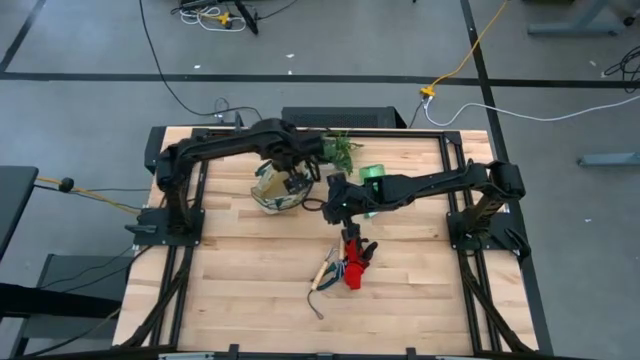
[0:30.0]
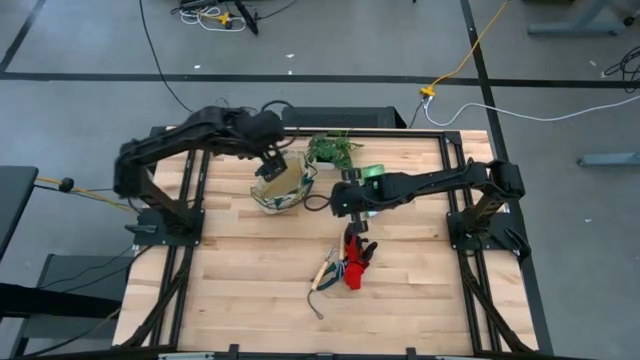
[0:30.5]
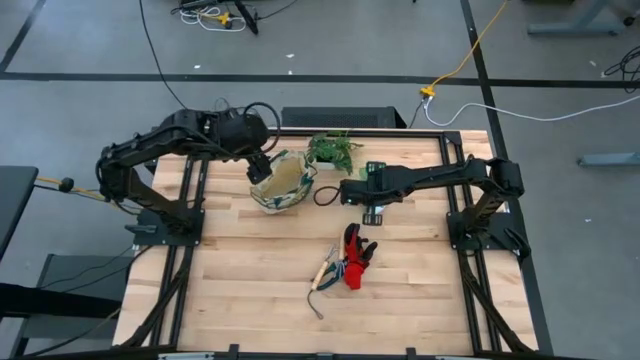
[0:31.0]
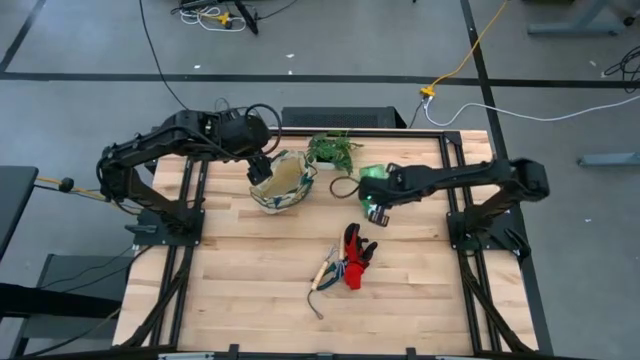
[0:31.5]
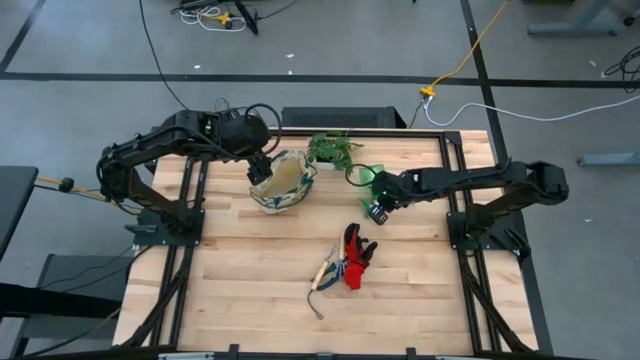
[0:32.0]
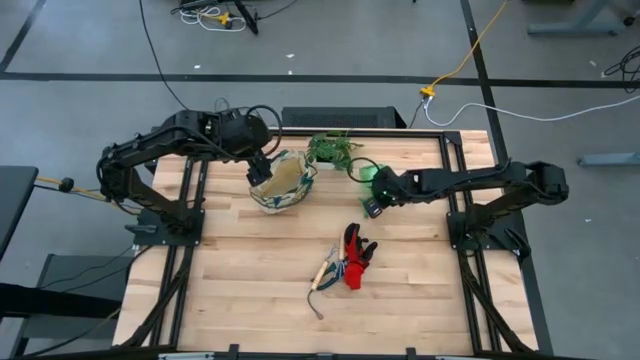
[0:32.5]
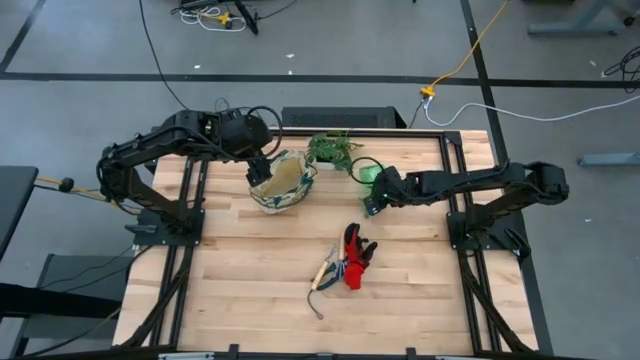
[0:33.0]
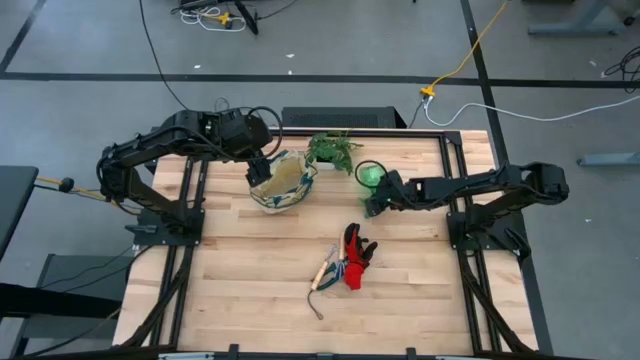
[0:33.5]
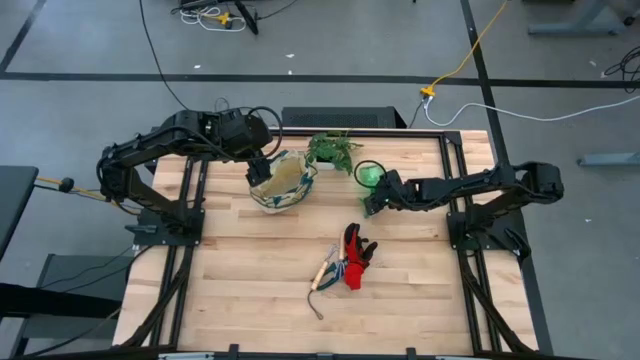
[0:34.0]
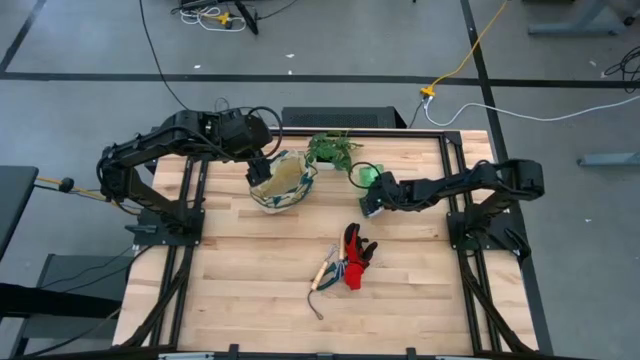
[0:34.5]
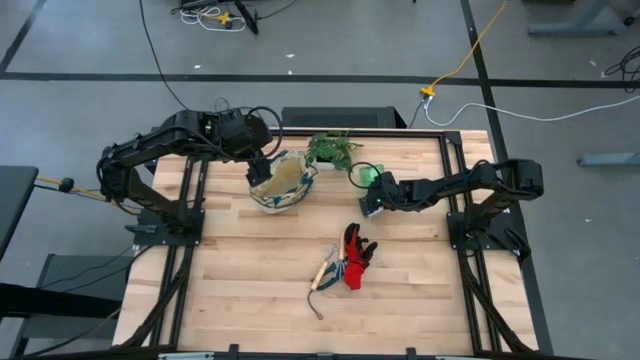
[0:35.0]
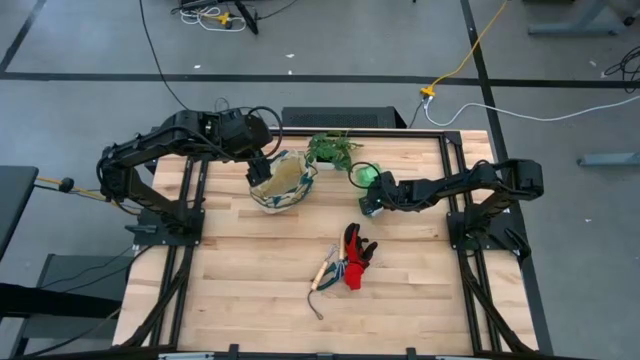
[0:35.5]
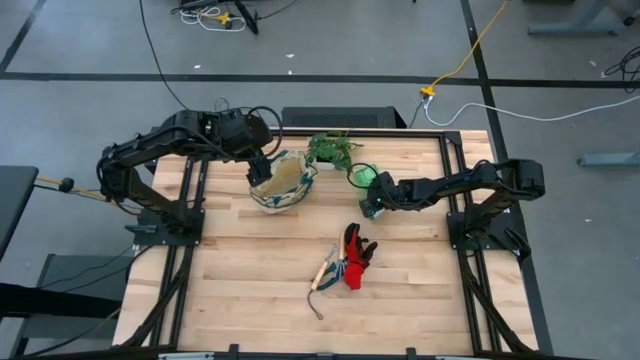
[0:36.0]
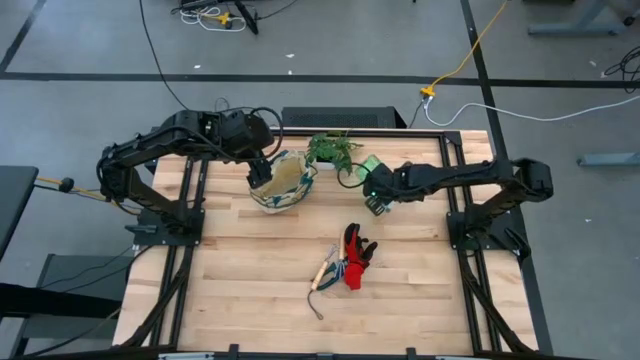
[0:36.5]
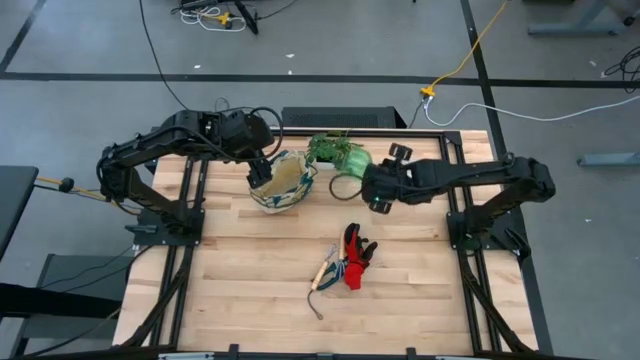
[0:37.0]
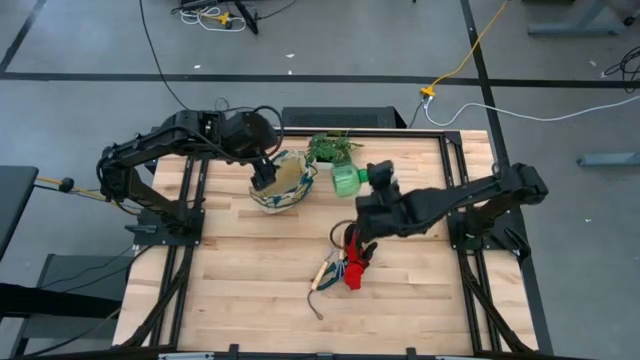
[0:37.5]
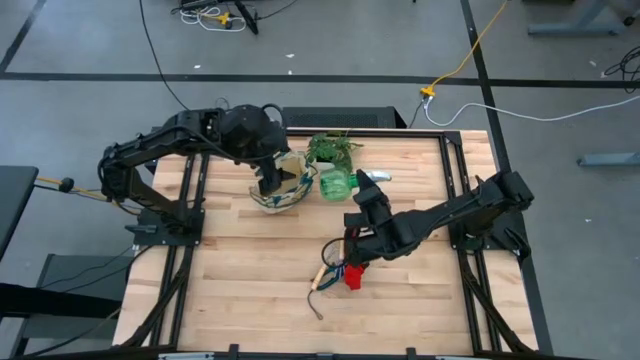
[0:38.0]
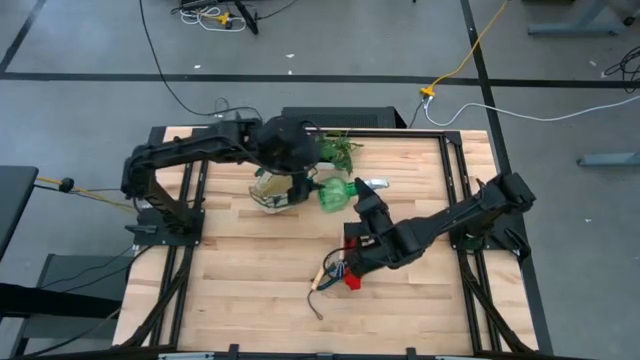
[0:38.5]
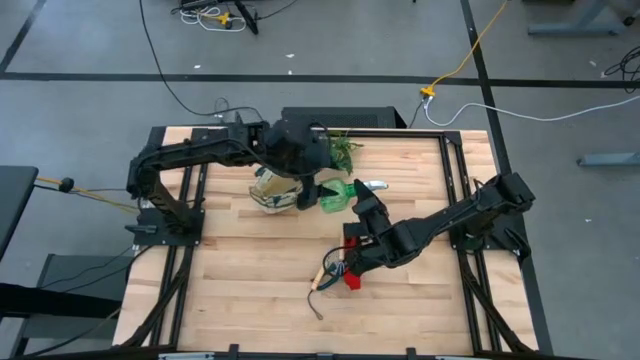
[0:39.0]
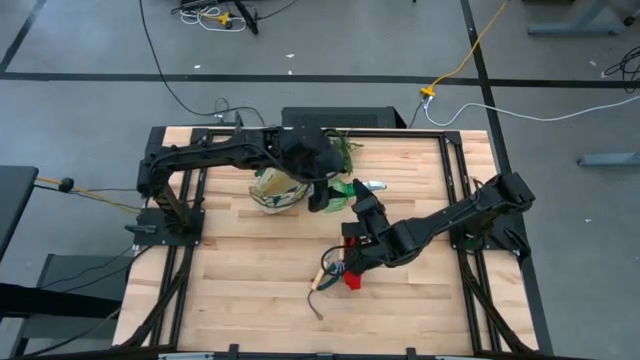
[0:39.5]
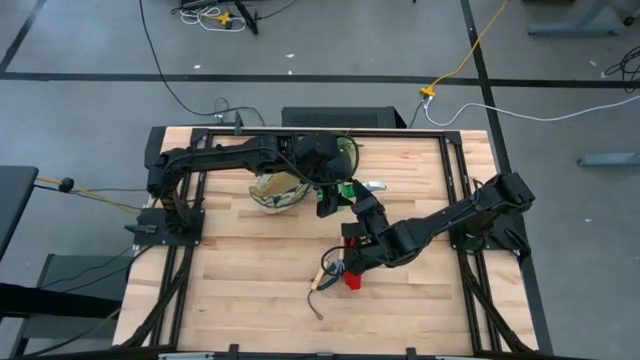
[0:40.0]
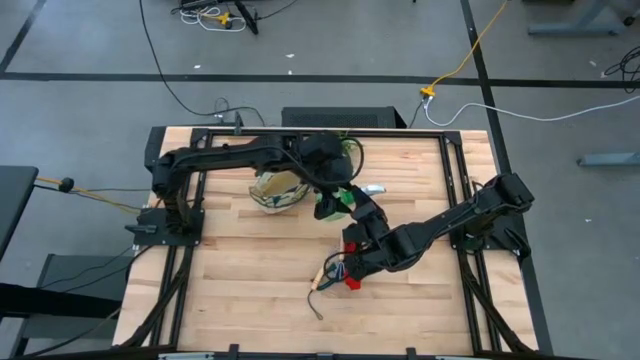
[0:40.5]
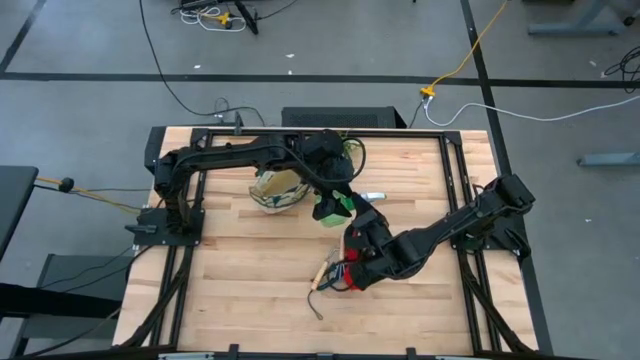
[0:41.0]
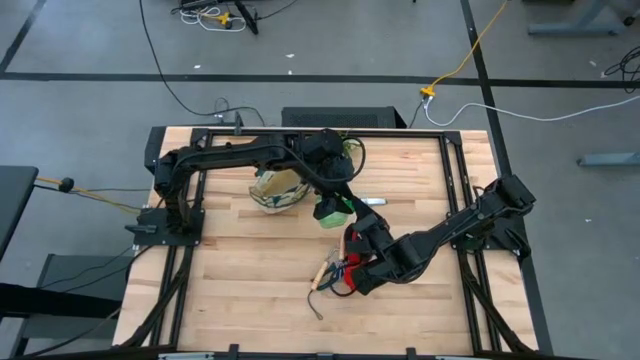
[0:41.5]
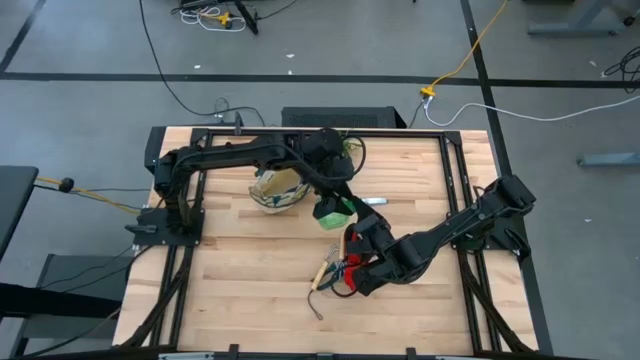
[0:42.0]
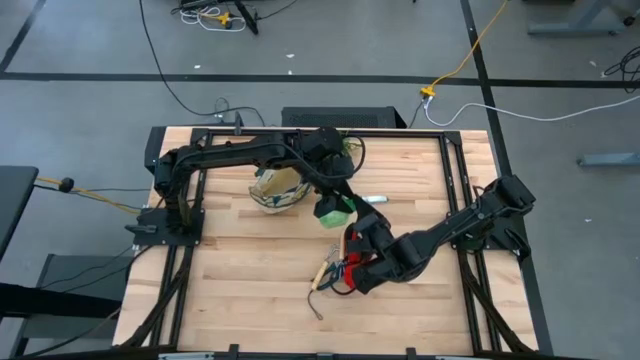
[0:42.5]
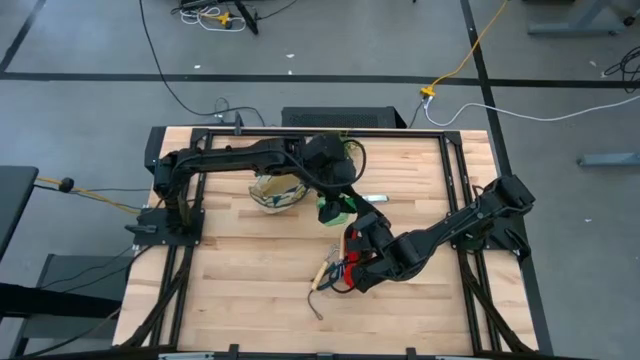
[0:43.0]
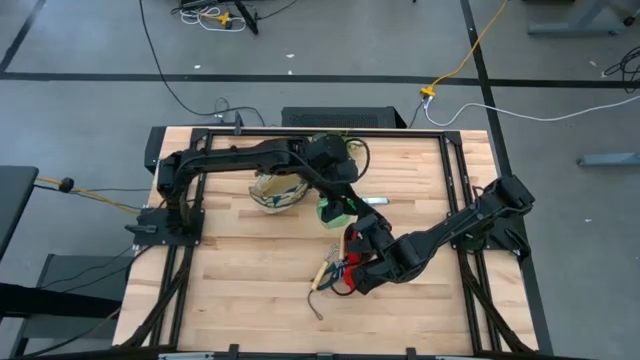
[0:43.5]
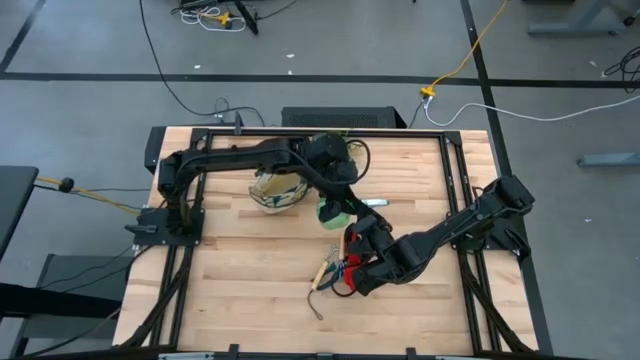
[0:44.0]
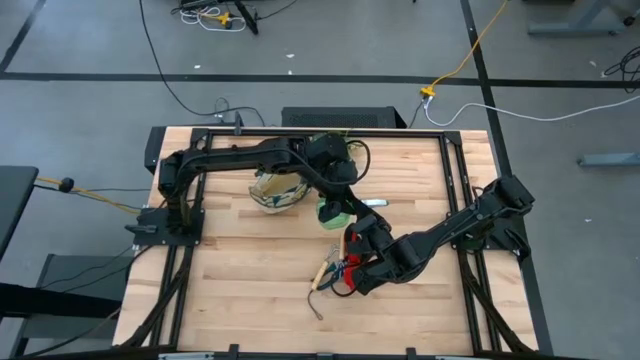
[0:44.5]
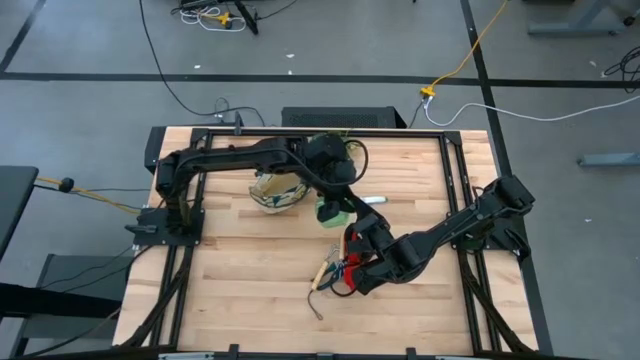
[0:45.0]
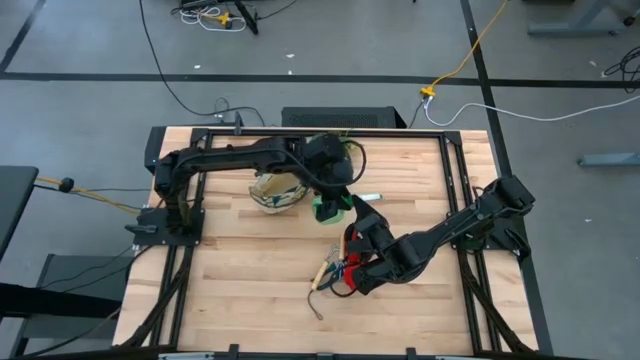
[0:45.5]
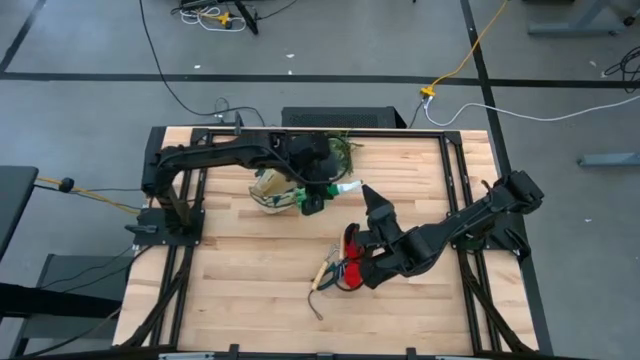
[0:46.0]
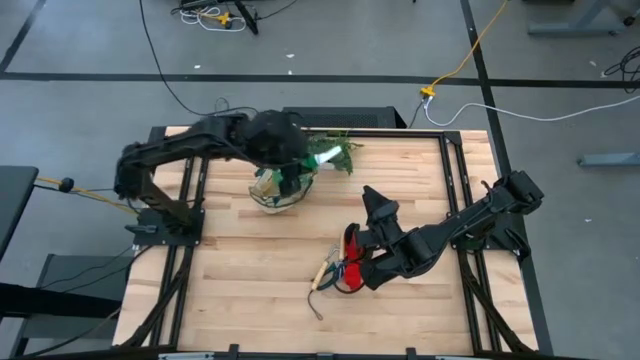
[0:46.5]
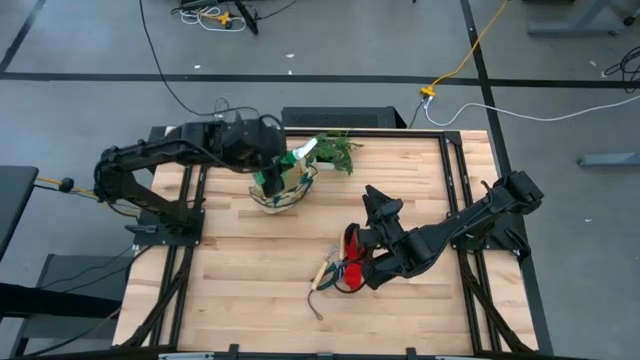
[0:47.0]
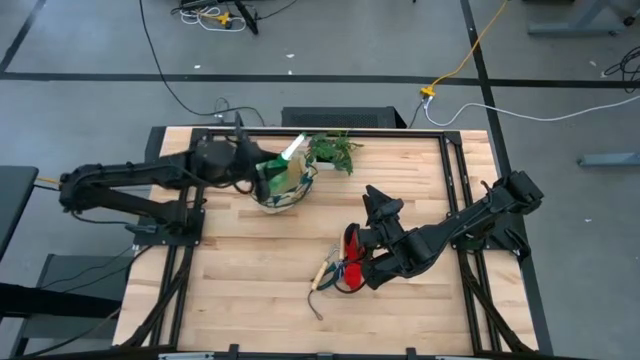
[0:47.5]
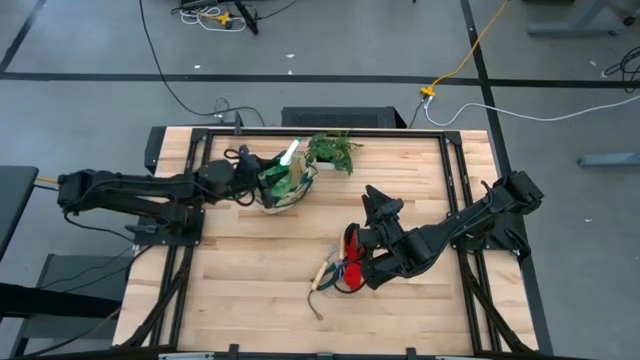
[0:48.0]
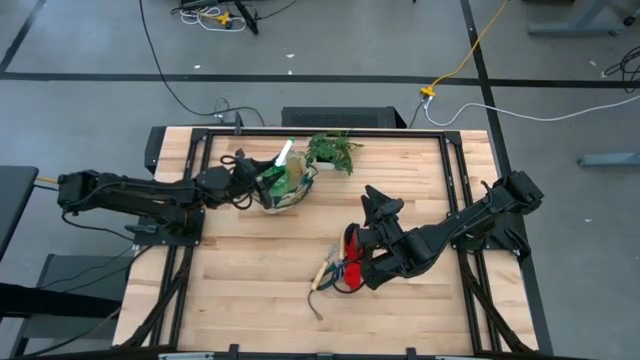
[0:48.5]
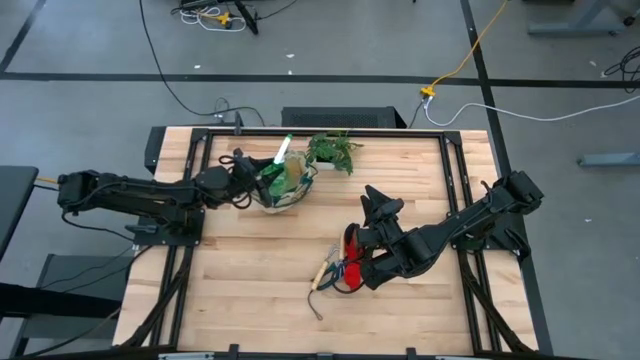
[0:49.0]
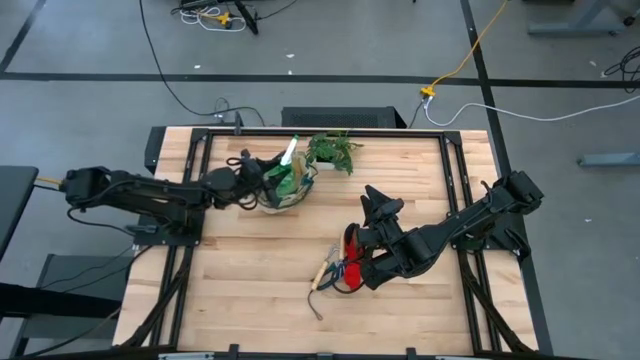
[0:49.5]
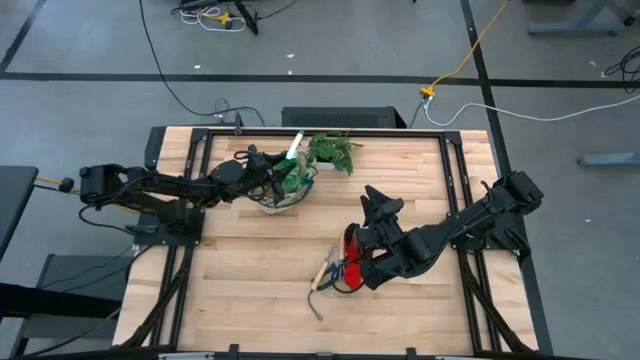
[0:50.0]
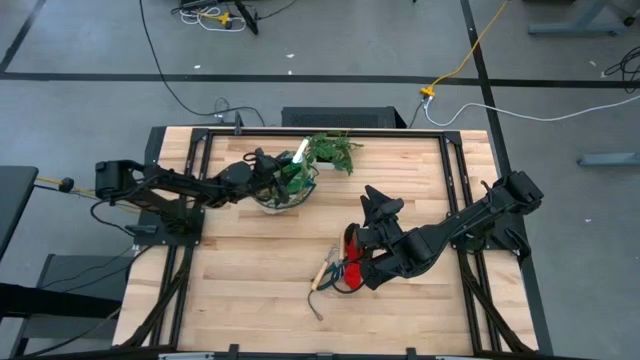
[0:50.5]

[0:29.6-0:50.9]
Task: Pick & Place Garden tools in Gardening bag
Put the green spray bottle into the gardening bag
